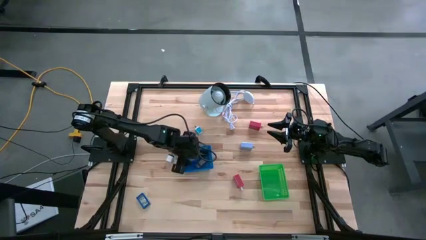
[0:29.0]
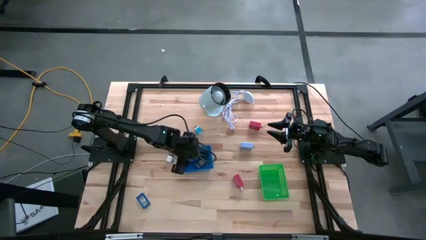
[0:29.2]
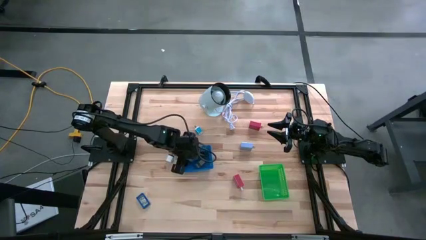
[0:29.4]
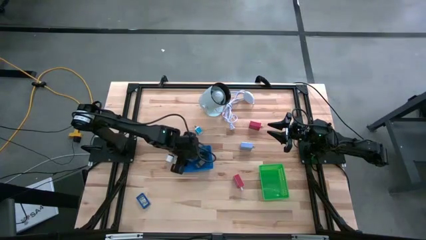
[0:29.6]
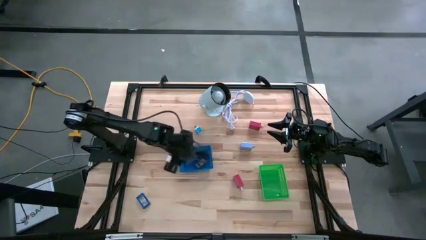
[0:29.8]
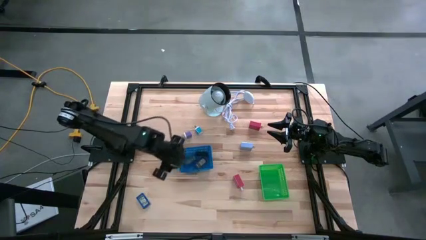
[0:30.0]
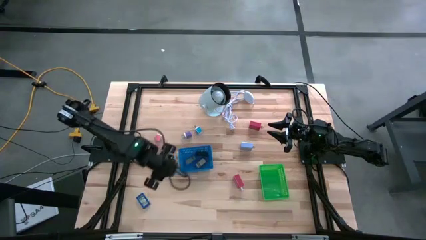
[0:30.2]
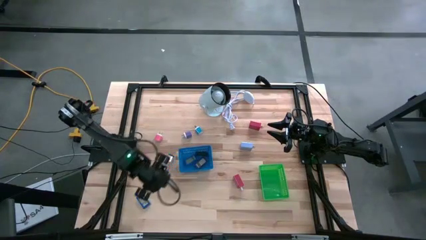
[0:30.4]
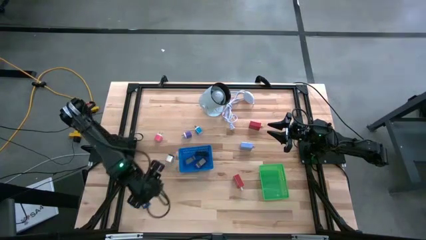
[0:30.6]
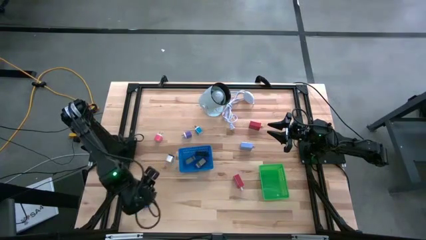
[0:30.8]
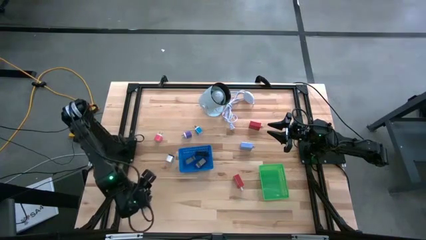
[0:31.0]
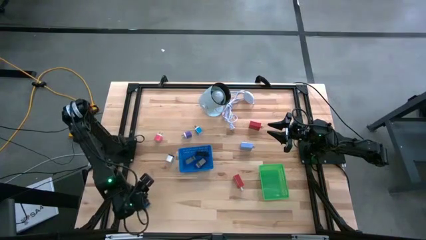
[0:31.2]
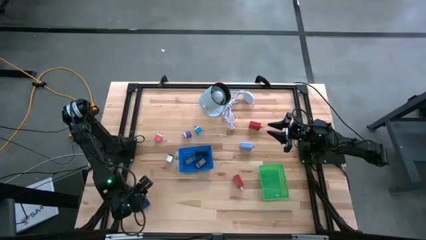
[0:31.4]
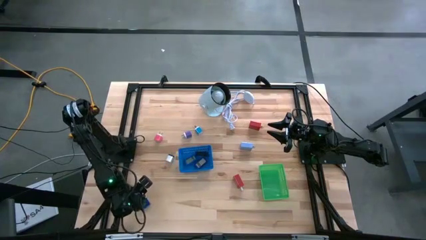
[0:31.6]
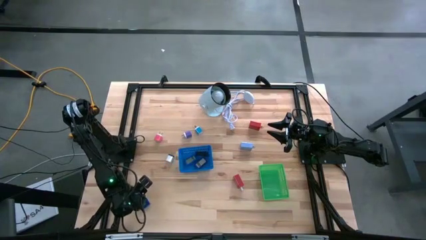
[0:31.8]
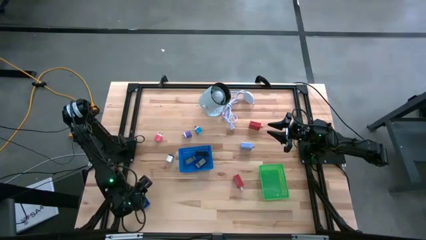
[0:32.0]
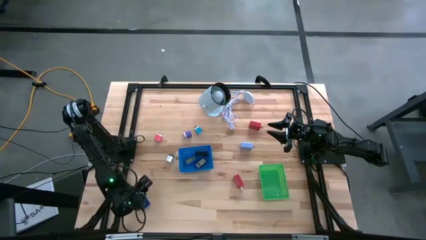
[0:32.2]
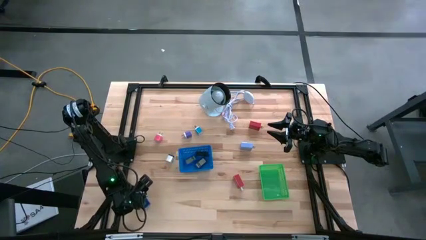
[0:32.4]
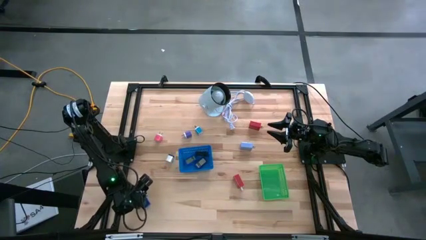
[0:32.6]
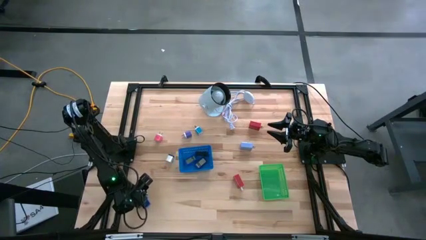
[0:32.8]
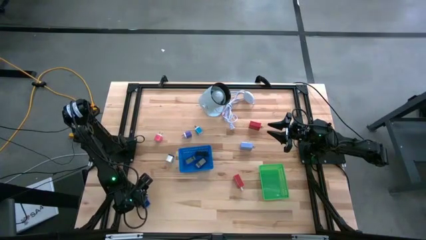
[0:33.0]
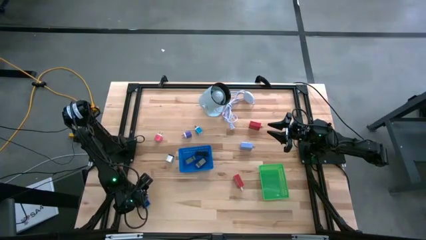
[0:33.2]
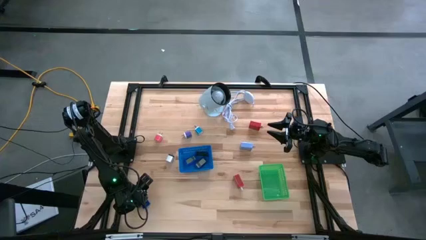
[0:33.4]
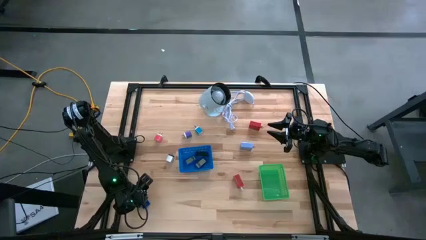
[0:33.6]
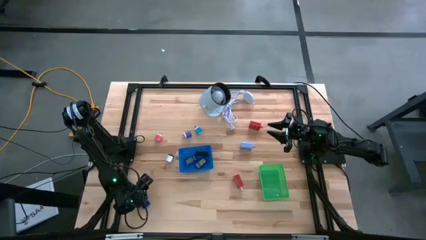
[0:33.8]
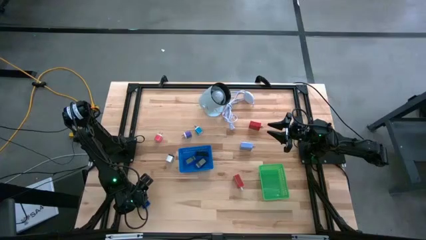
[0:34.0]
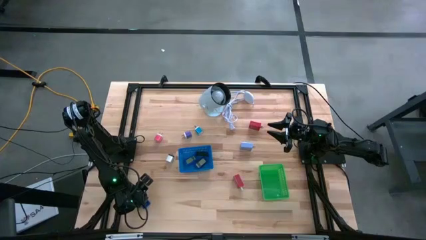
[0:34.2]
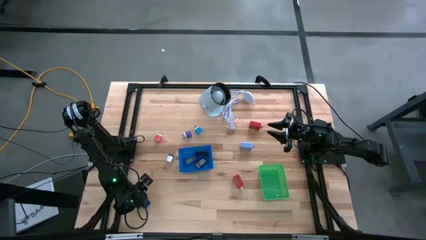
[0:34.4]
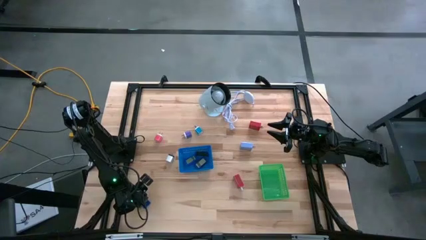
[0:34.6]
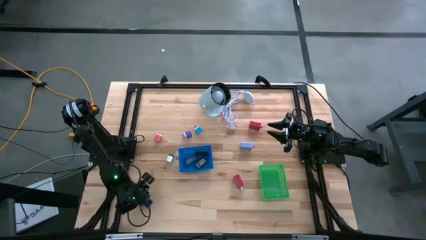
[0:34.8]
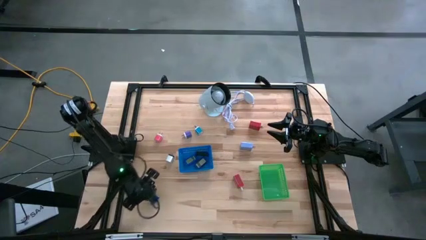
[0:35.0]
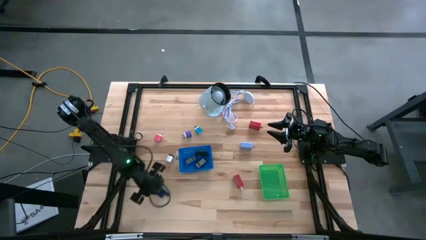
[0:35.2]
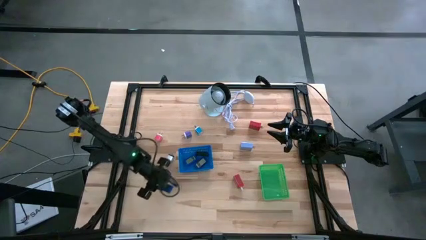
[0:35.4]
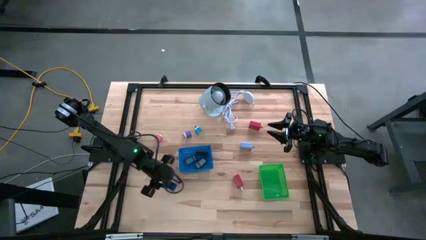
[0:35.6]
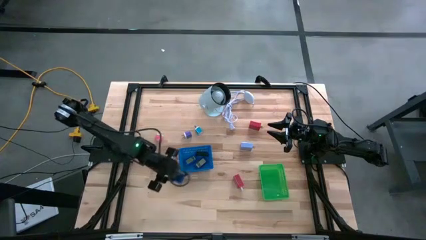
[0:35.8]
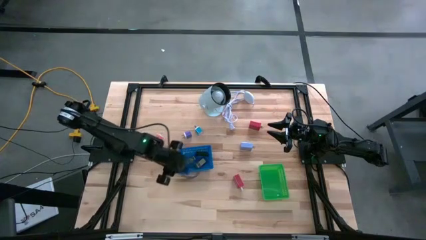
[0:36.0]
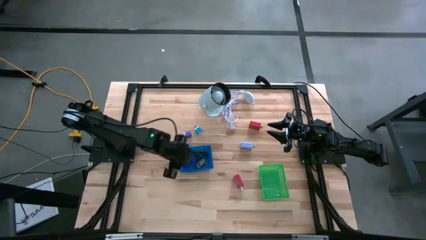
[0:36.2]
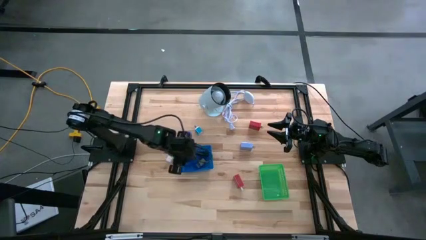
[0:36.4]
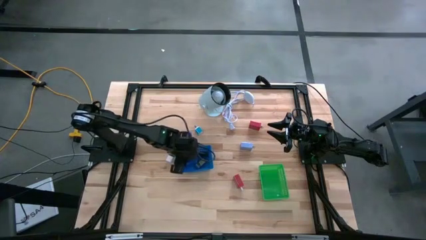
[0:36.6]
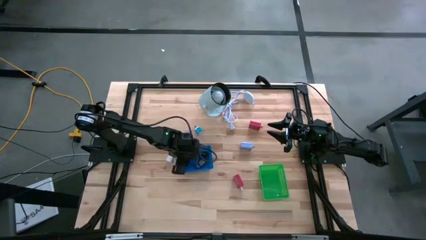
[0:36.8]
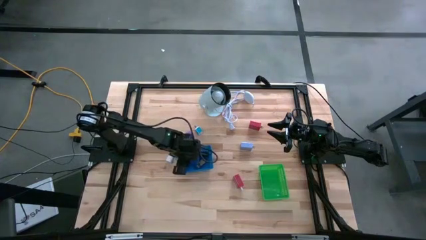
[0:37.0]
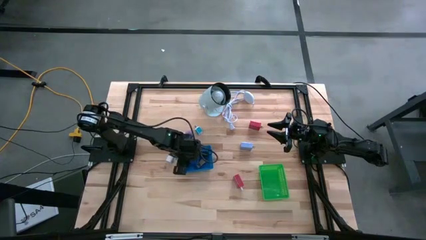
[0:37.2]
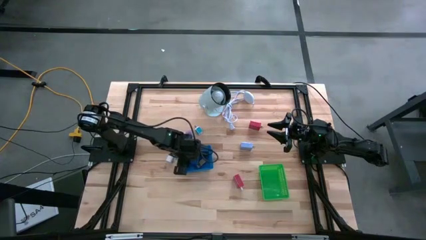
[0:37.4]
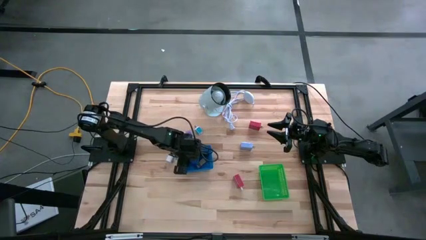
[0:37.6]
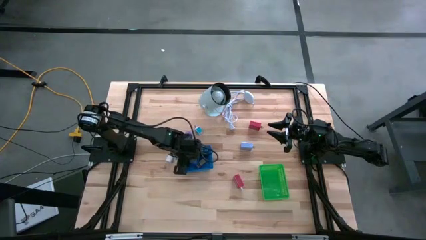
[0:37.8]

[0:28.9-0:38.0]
Task: Pick & Place Office items
Put the blue digital clock into the blue bin

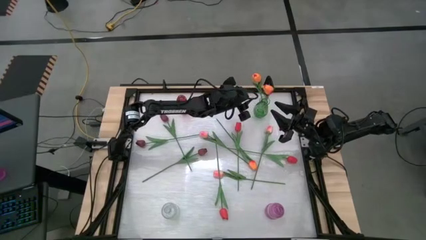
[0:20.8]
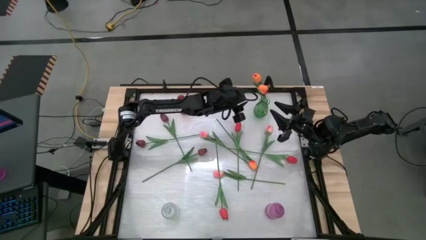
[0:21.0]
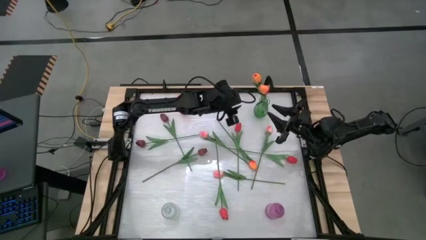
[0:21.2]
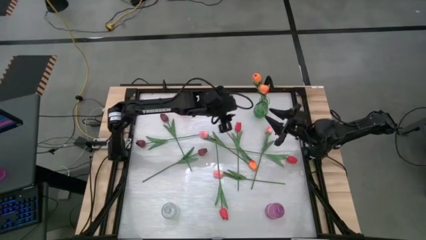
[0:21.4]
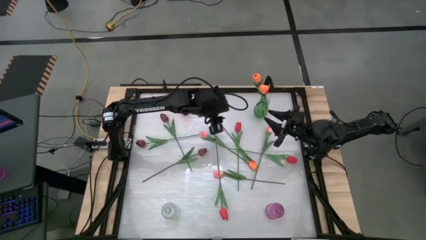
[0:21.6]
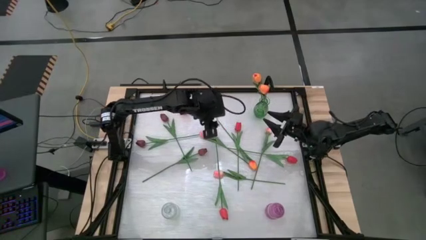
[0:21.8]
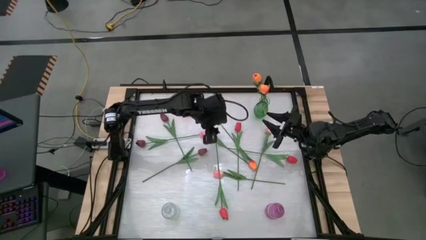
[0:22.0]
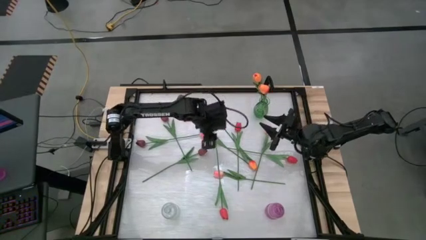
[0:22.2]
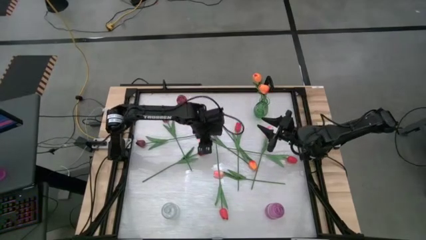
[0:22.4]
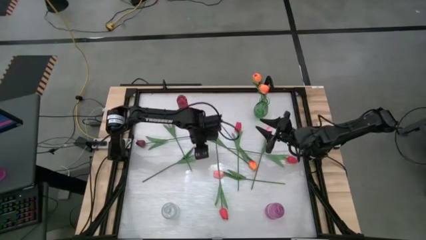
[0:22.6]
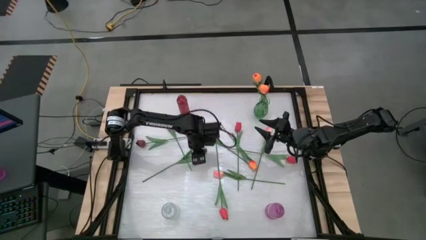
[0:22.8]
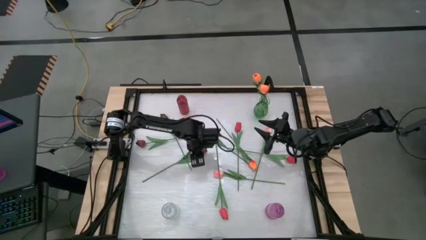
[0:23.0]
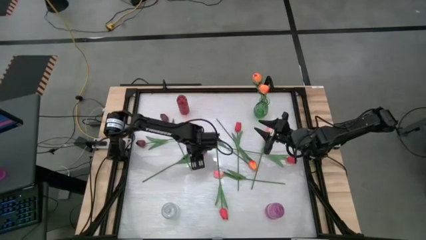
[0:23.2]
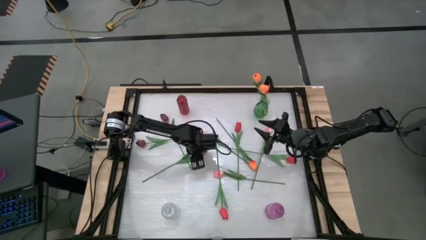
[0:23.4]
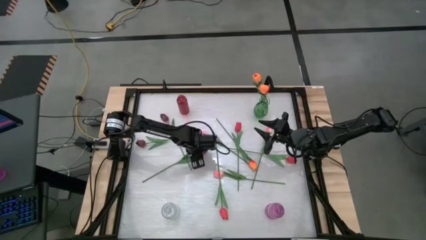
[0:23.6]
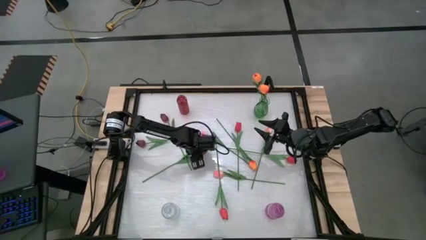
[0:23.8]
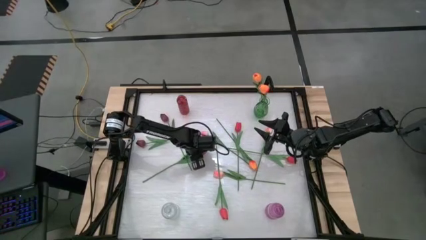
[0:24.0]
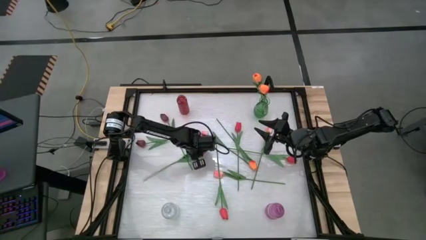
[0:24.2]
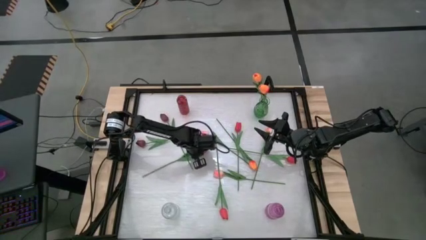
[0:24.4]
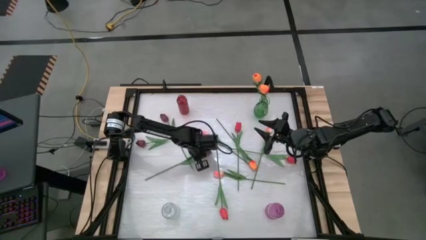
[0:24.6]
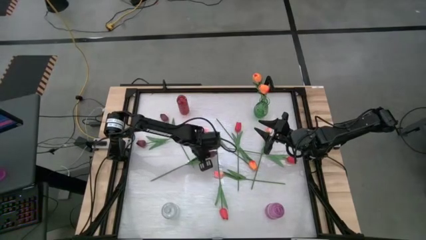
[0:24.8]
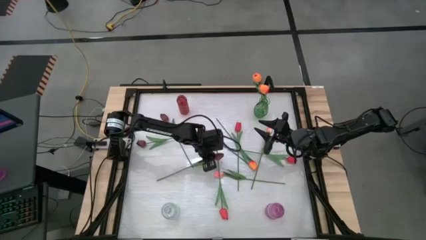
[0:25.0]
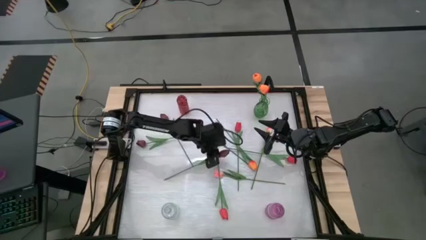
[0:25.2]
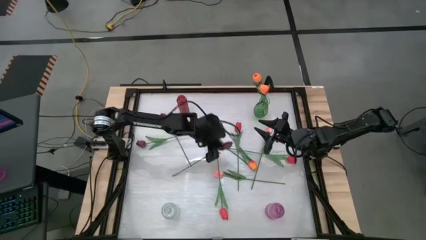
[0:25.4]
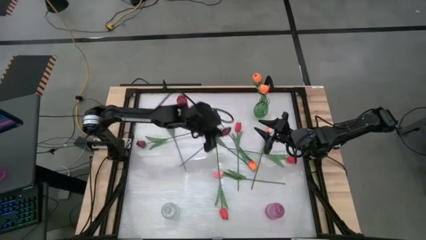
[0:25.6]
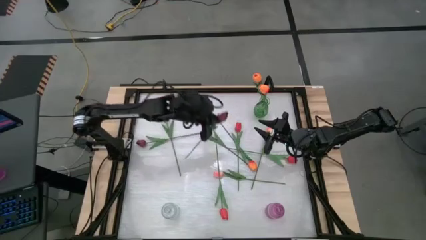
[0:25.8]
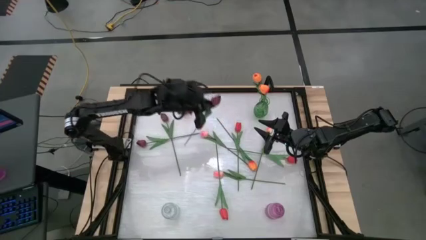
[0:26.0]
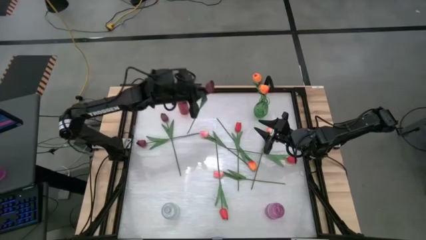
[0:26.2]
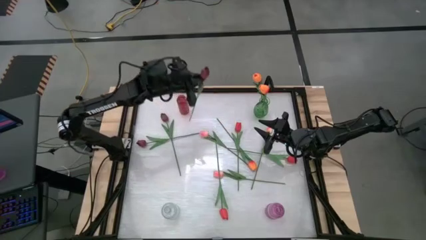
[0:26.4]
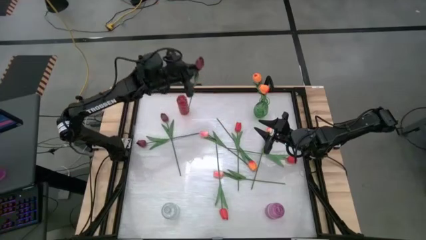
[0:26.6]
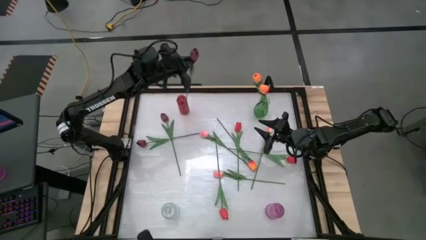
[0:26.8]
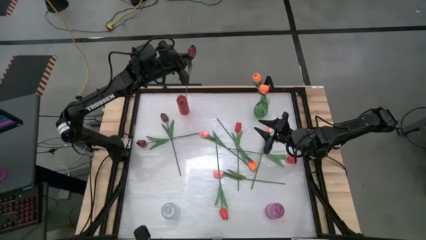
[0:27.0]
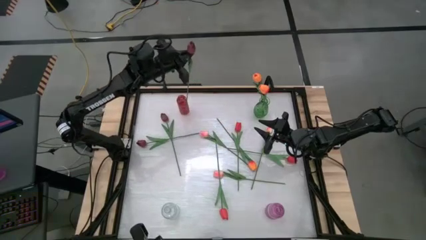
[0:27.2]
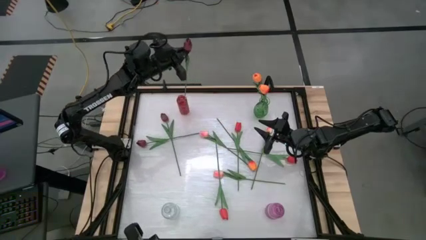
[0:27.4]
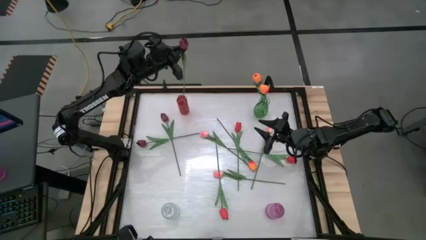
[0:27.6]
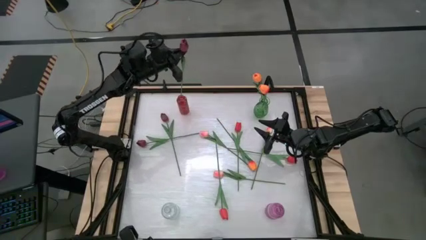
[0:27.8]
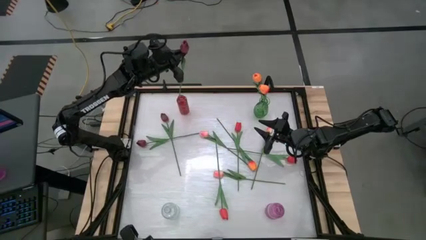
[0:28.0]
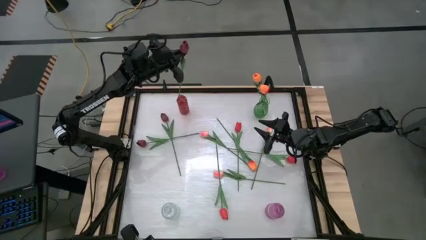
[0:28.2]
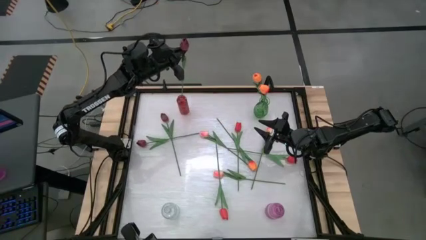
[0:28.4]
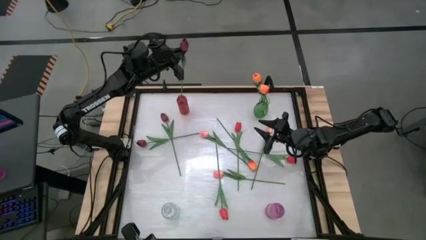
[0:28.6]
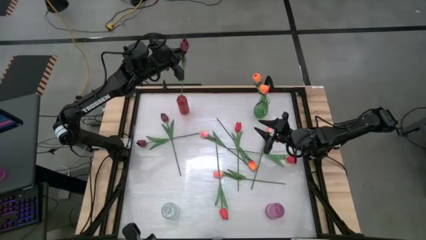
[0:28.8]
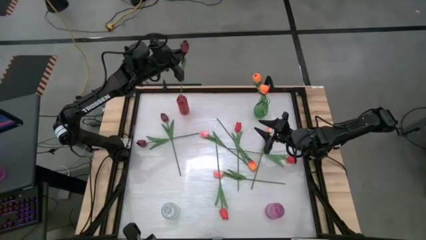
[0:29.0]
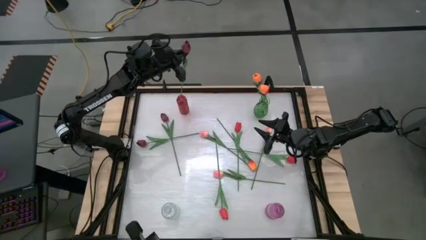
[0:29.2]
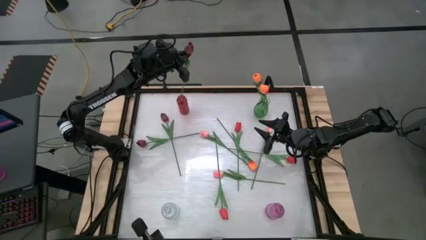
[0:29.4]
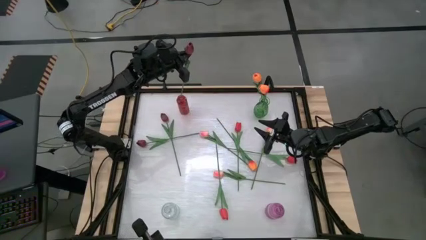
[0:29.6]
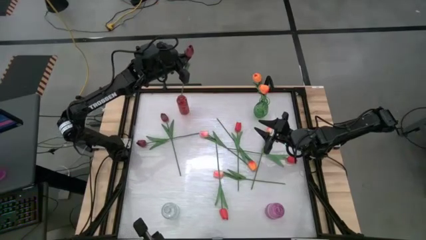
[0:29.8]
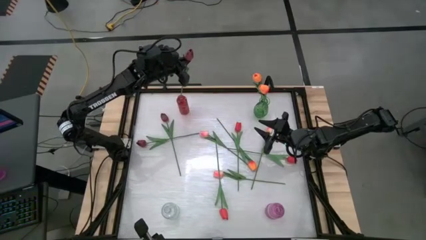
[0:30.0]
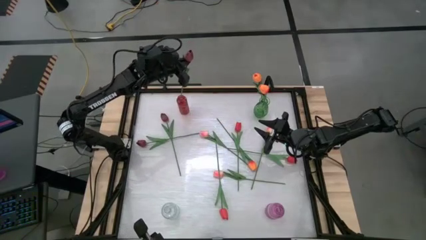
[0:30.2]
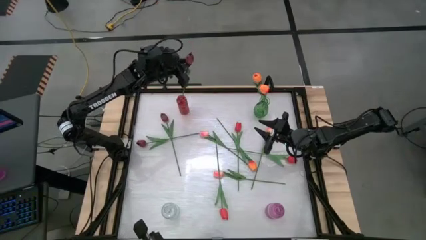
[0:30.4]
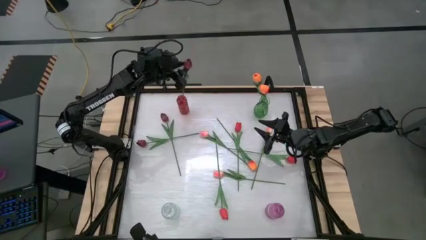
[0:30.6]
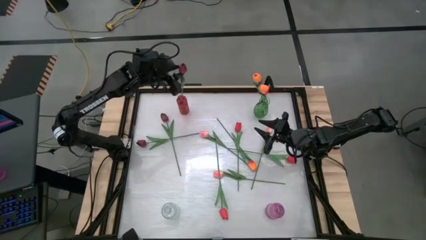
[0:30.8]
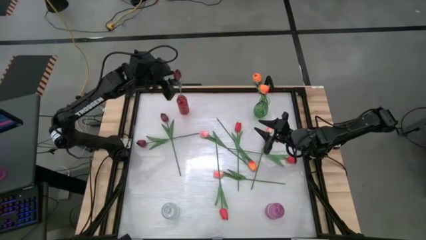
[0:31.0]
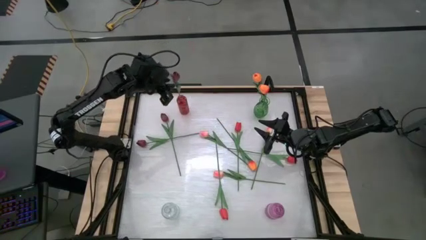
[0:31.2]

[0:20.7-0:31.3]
Task: Sort flowers into vase by color
Put the dark red flower into the red vase
